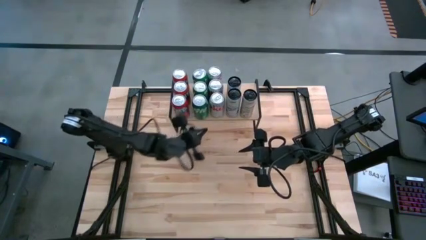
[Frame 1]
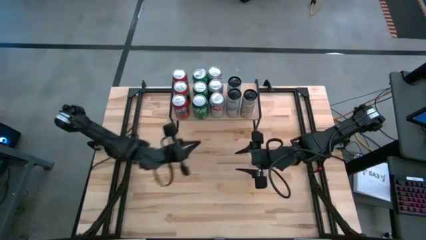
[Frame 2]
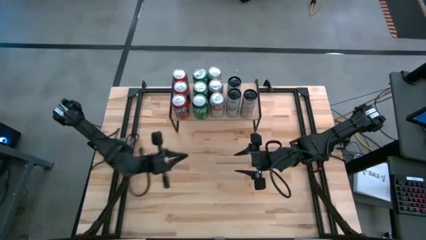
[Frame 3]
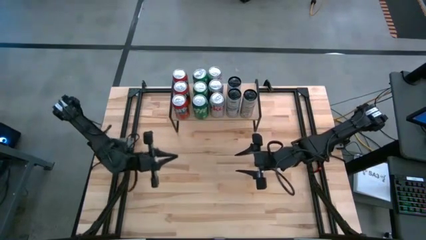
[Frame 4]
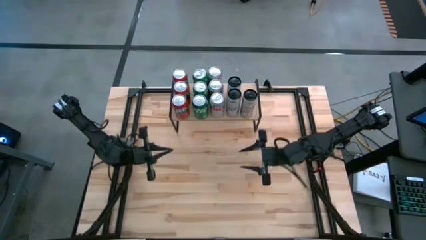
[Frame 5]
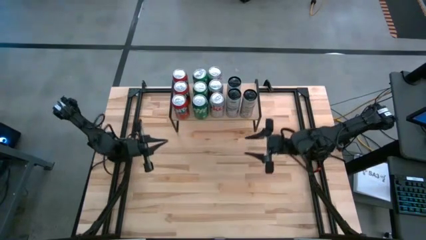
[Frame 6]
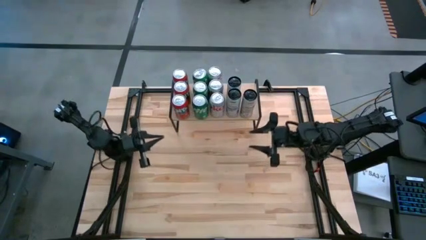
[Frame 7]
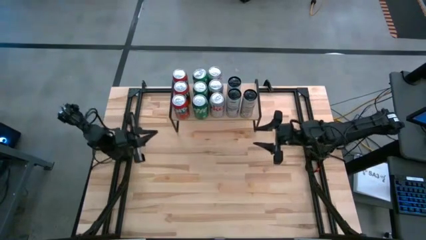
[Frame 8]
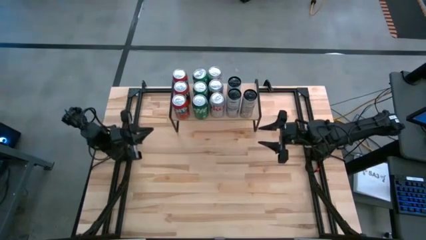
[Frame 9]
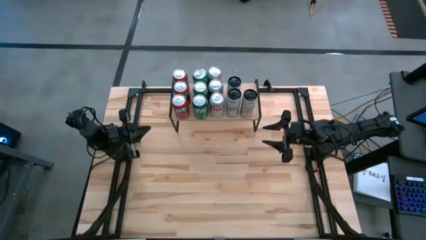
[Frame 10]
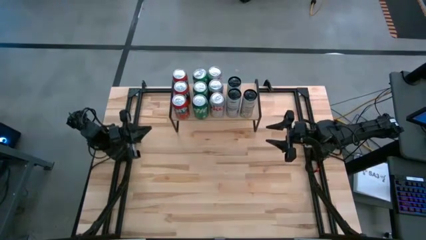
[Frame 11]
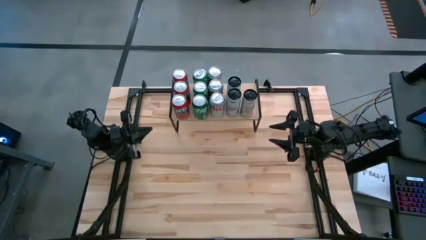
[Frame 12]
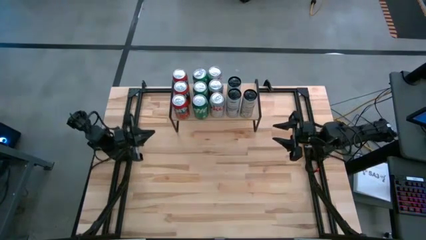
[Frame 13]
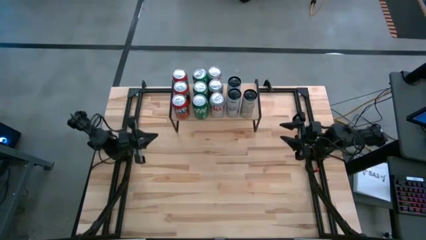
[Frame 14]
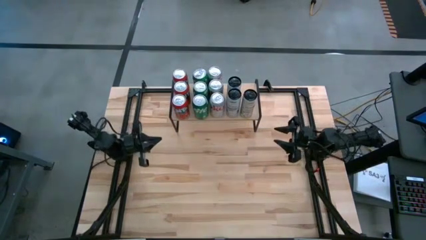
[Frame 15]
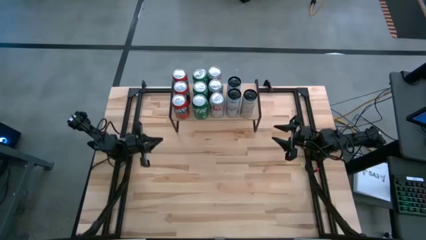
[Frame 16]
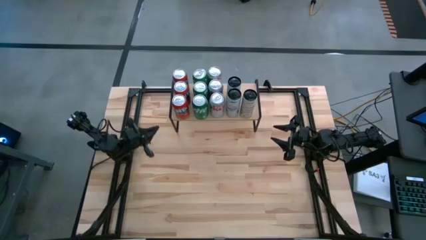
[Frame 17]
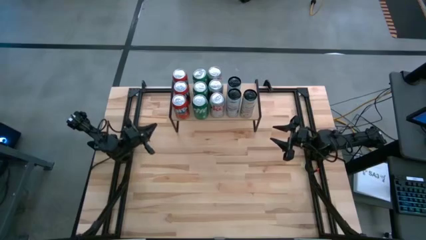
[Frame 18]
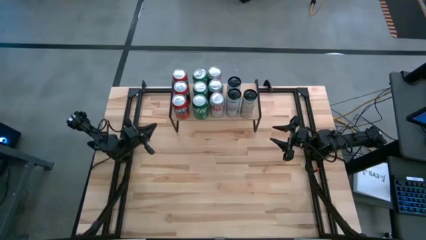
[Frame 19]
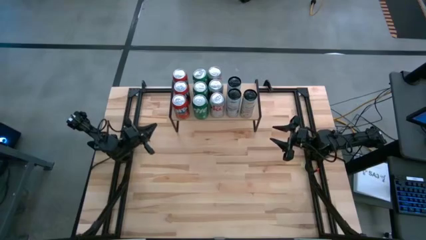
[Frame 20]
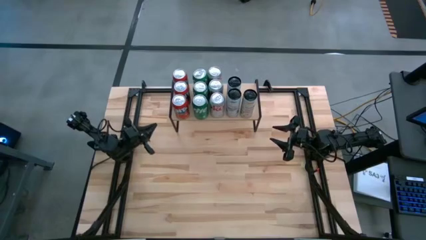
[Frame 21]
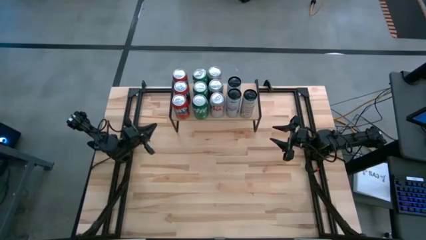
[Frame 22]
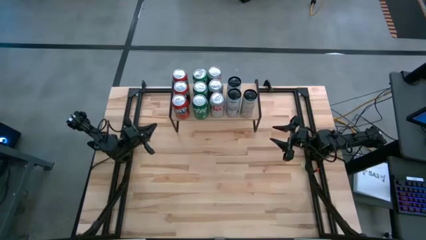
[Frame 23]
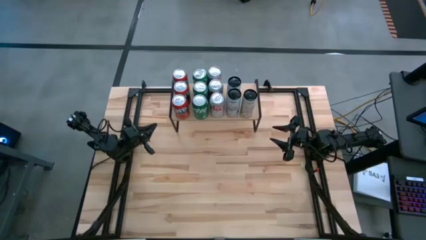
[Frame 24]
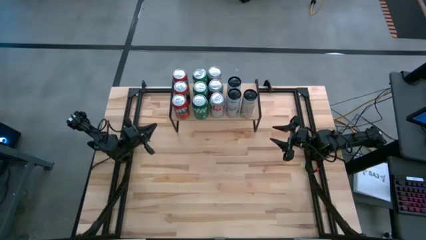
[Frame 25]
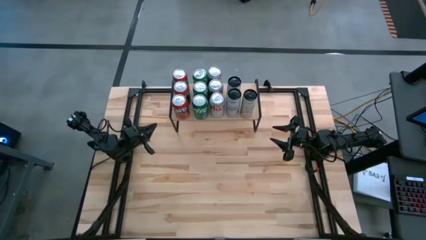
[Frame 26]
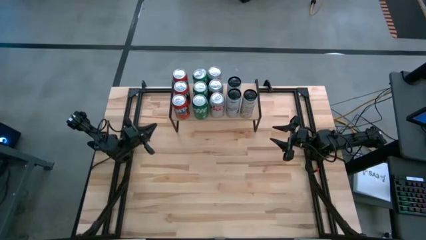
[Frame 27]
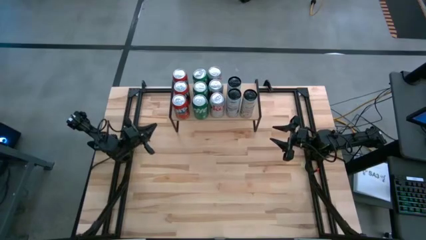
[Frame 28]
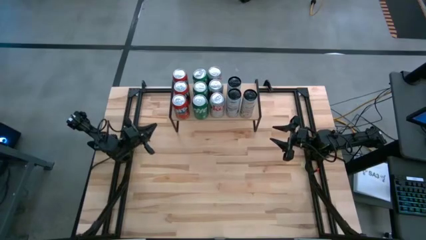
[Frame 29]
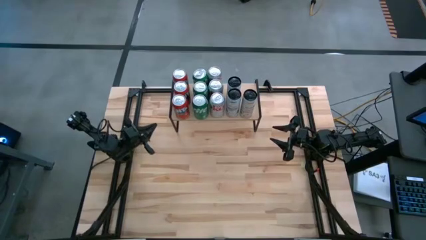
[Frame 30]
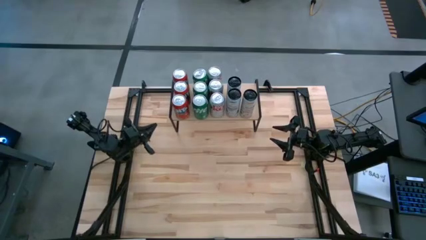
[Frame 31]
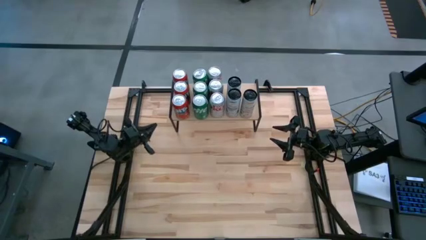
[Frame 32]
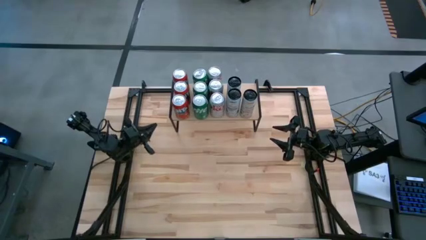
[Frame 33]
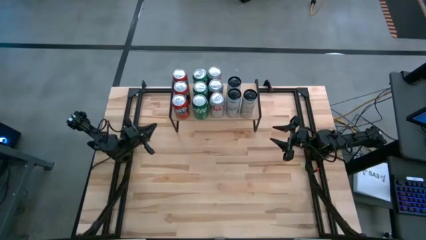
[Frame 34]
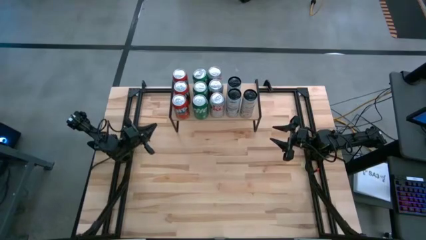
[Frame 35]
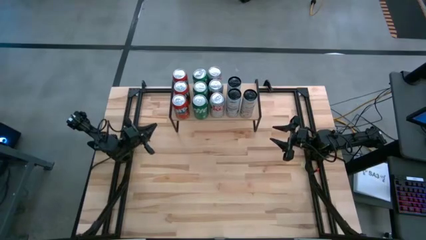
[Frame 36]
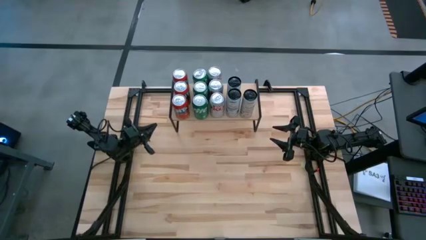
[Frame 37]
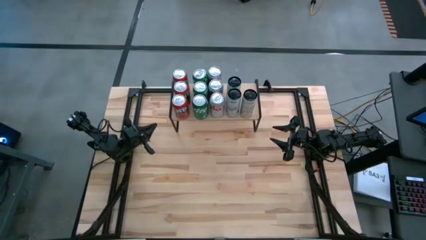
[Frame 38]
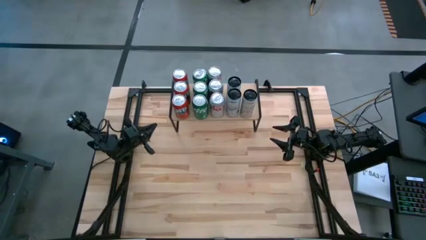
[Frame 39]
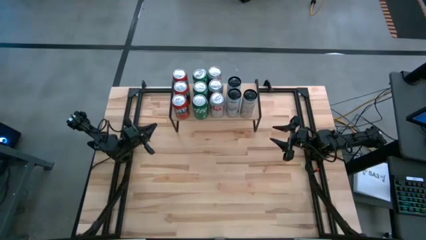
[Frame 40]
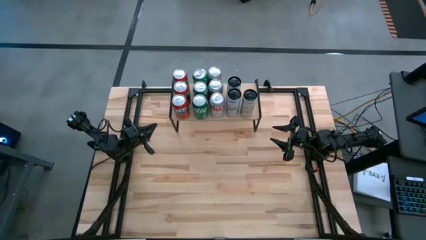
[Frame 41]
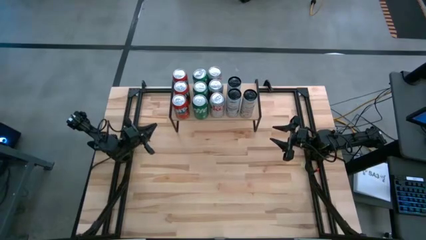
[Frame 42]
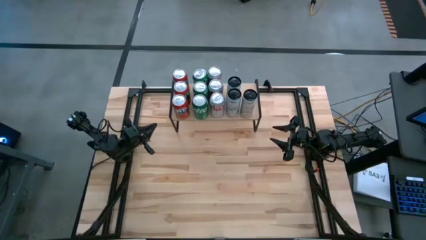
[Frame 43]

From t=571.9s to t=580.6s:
Task: Place canned beverage on shelf
Return to Home Position

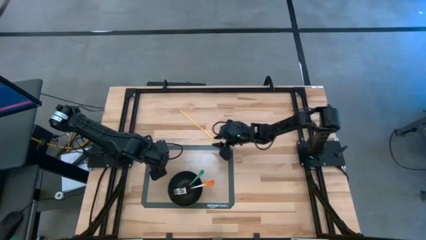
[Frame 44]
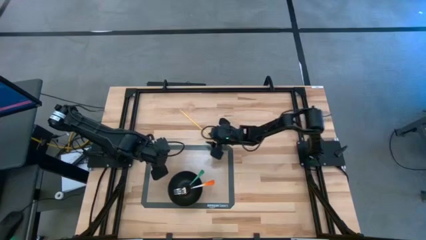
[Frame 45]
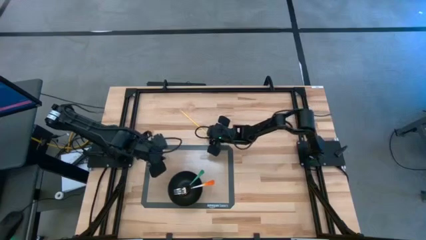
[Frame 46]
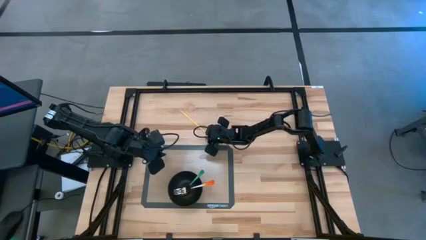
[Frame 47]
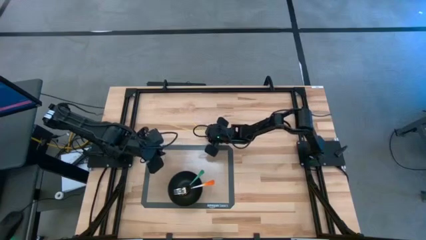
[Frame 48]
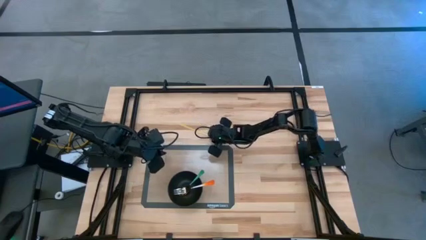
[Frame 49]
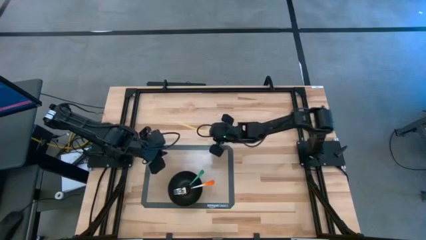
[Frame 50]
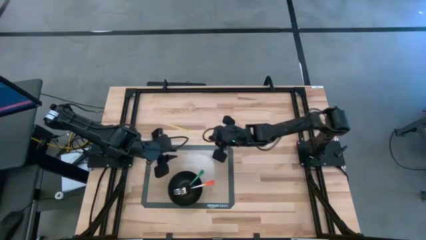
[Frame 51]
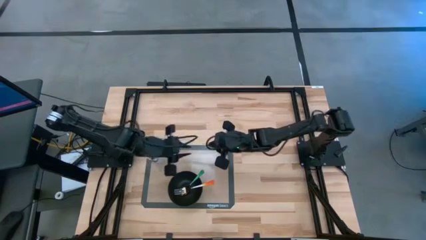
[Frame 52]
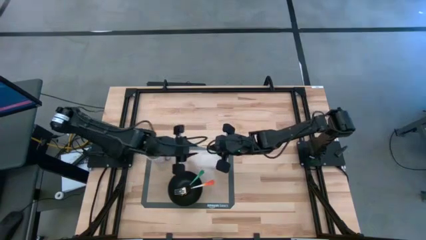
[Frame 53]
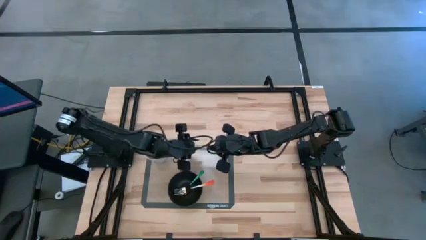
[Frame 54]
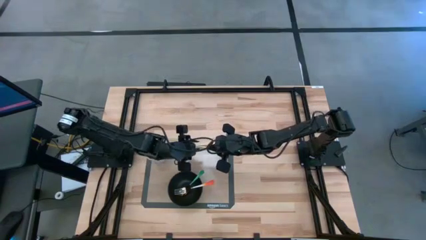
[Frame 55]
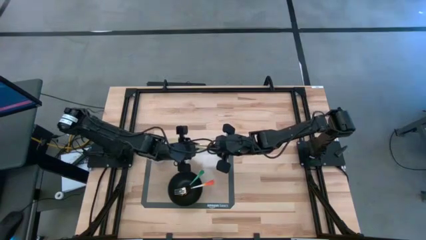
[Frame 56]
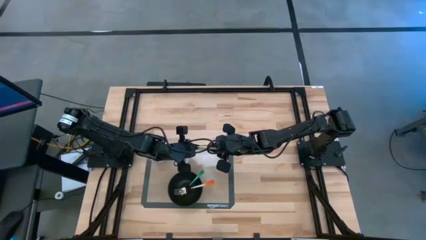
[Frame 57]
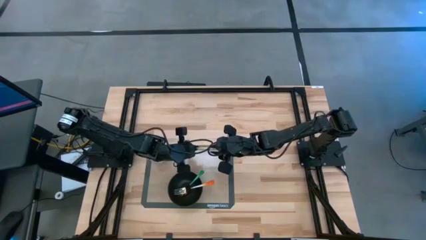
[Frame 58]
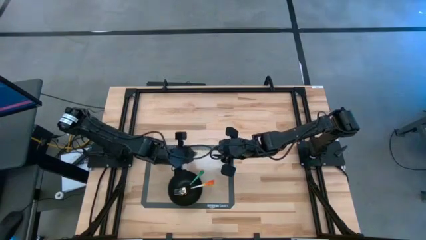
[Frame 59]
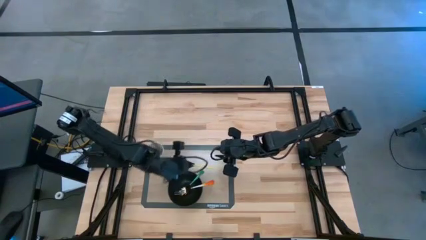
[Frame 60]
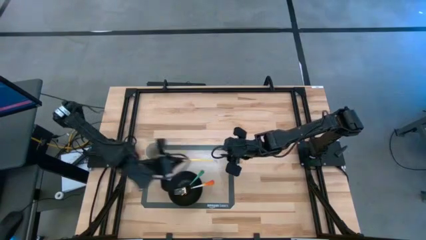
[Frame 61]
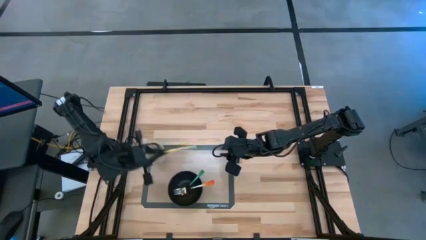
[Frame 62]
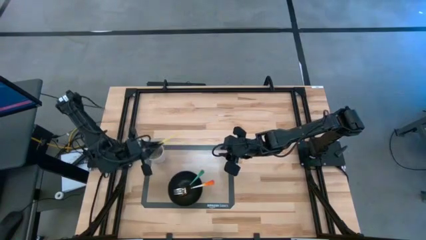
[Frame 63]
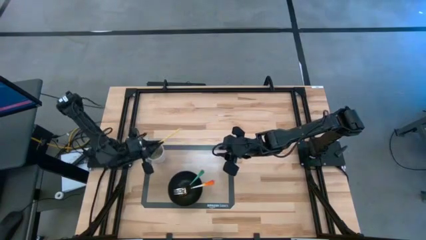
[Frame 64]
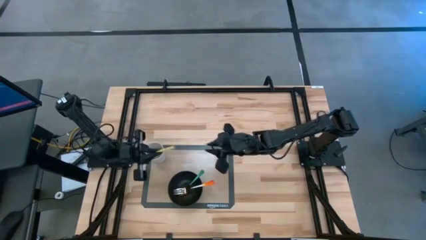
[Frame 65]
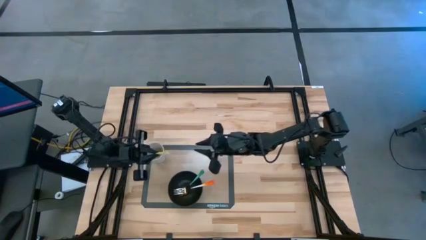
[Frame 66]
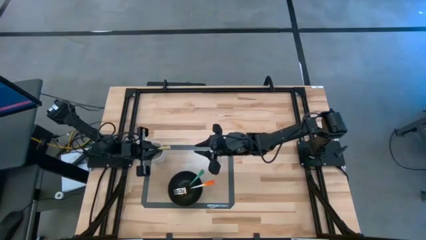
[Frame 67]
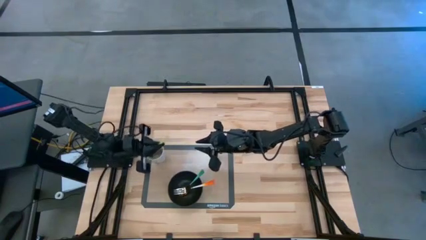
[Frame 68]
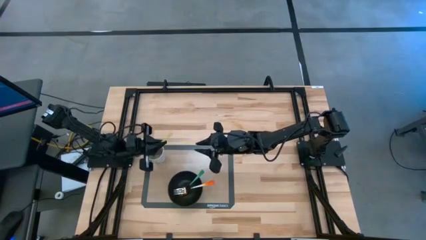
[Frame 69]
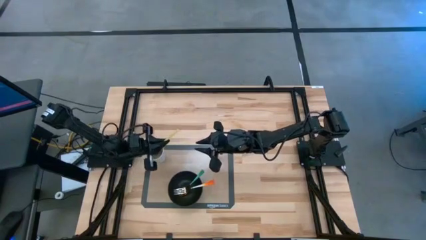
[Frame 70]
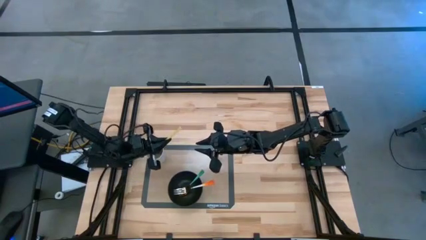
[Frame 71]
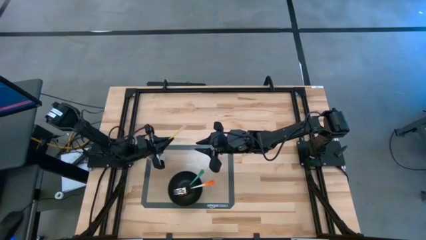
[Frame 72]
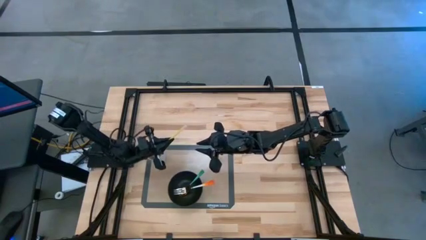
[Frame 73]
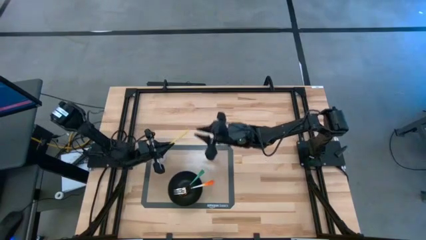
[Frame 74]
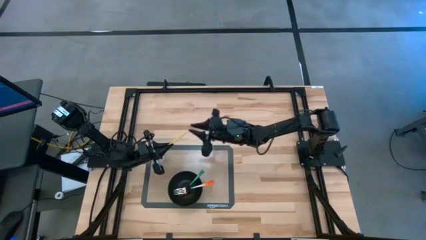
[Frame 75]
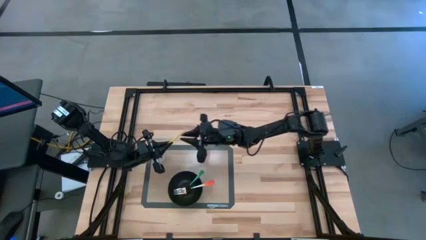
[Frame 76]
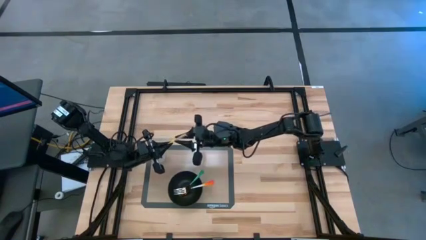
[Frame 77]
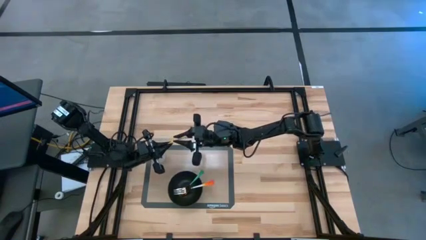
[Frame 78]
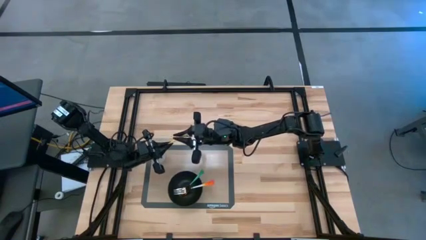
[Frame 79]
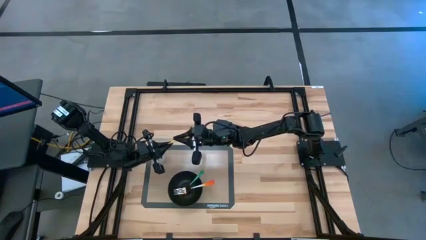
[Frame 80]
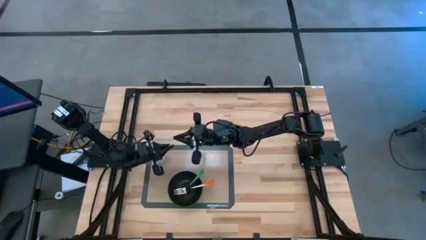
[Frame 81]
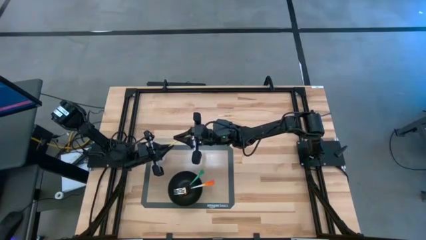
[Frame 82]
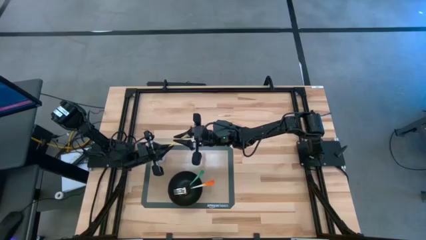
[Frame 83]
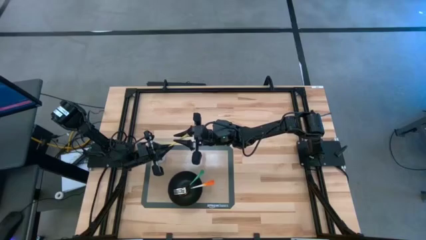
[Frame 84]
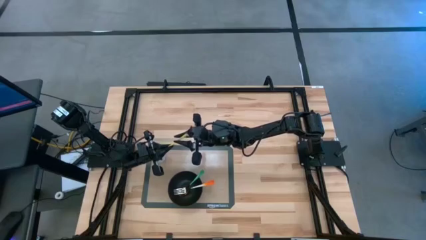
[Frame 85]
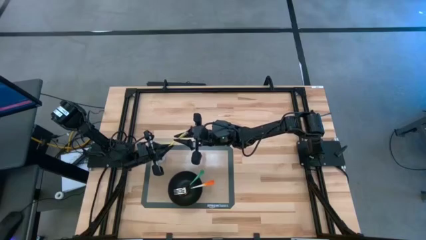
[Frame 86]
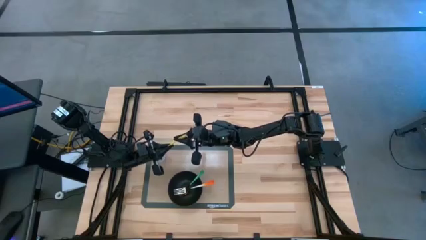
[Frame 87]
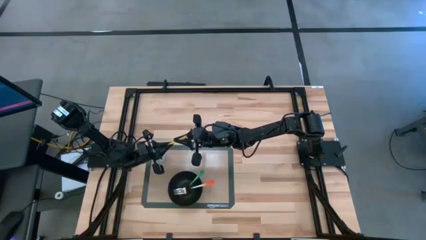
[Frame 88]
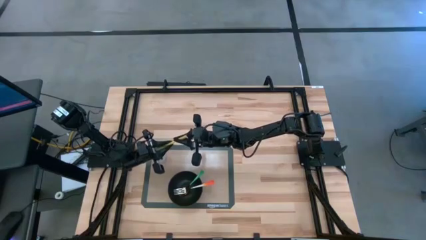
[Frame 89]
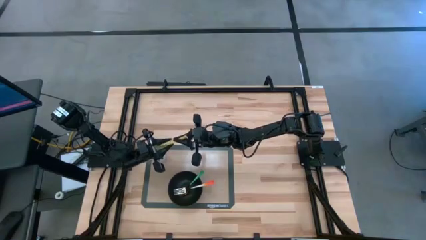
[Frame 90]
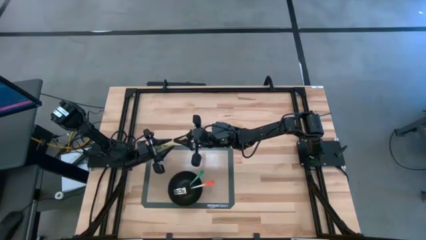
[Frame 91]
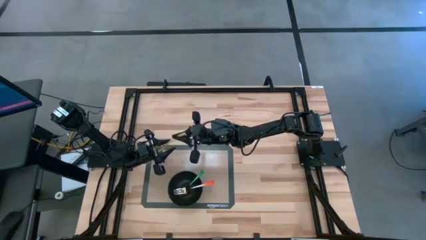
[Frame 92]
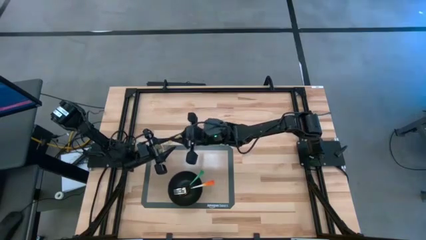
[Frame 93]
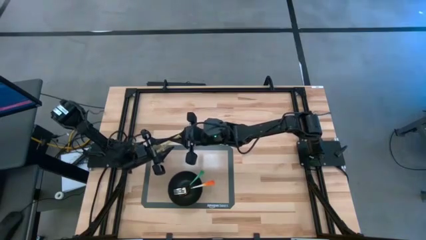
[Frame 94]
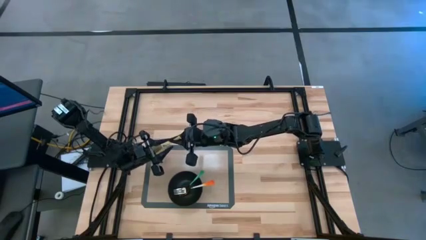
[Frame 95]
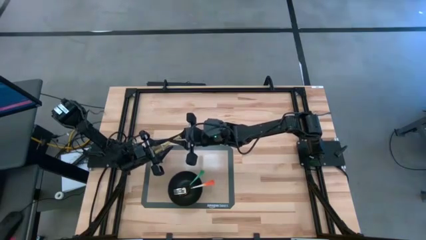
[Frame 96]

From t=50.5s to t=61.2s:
Task: Pick & Place Utensil
Put the yellow straw into the white cup on the mat
